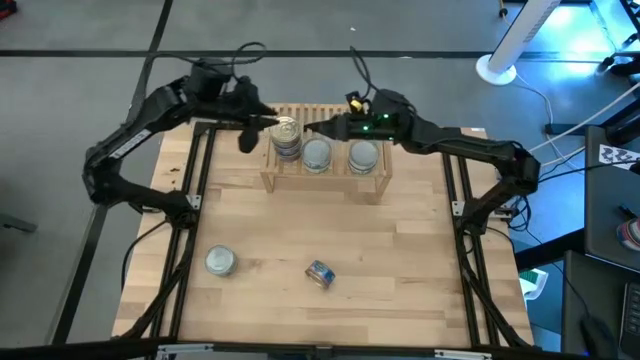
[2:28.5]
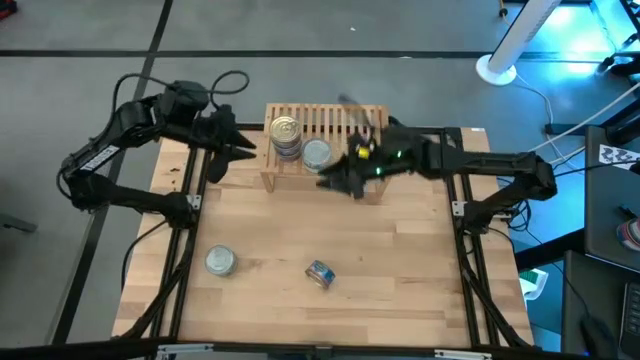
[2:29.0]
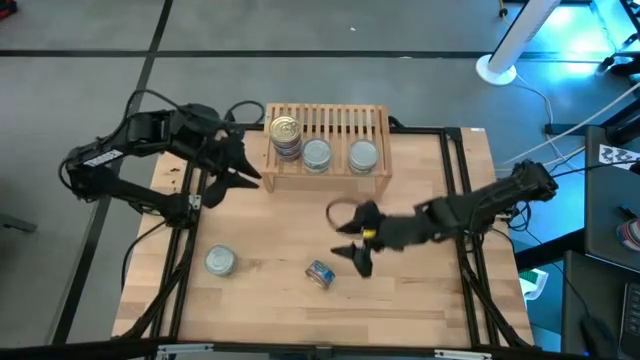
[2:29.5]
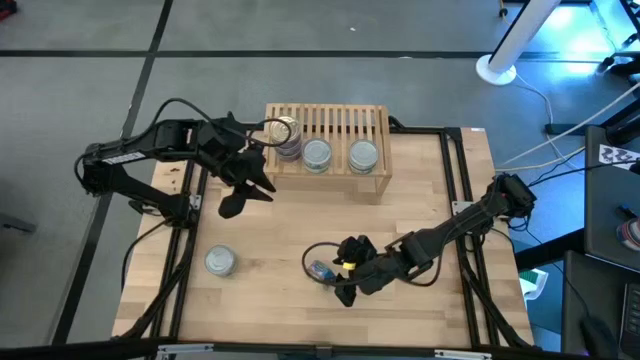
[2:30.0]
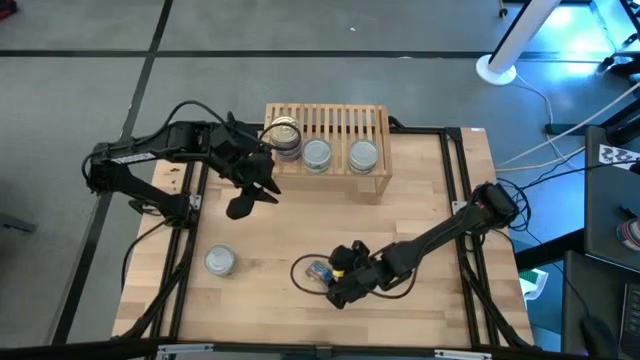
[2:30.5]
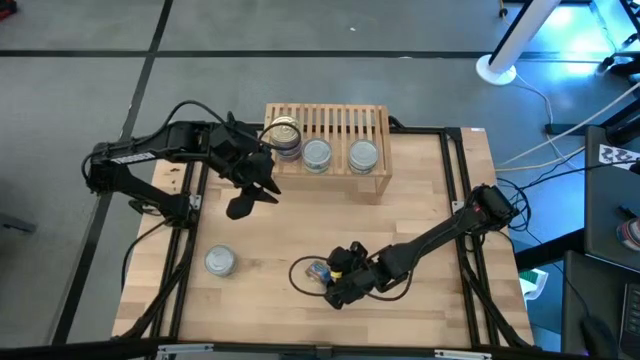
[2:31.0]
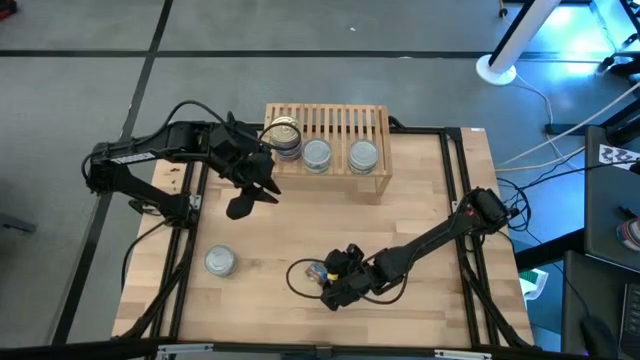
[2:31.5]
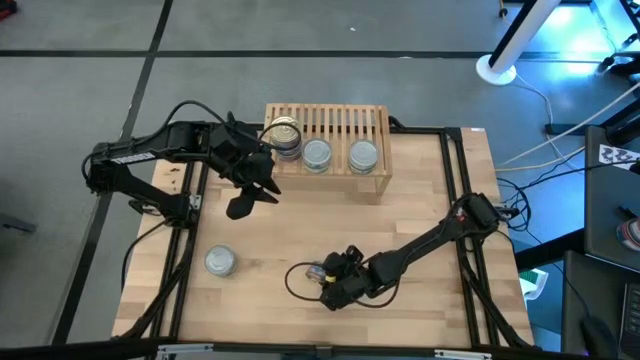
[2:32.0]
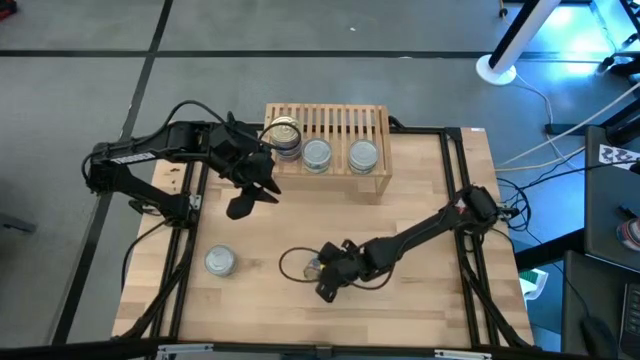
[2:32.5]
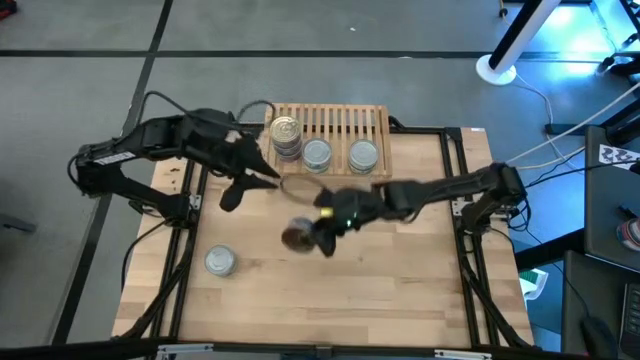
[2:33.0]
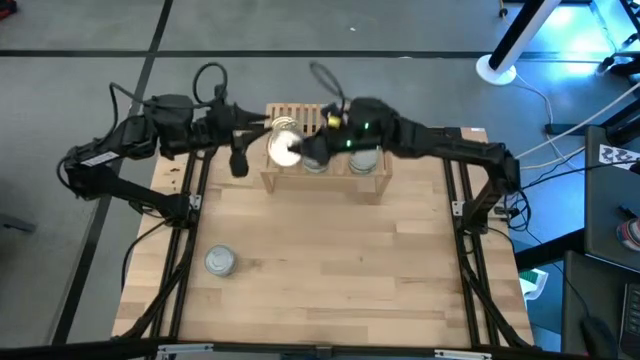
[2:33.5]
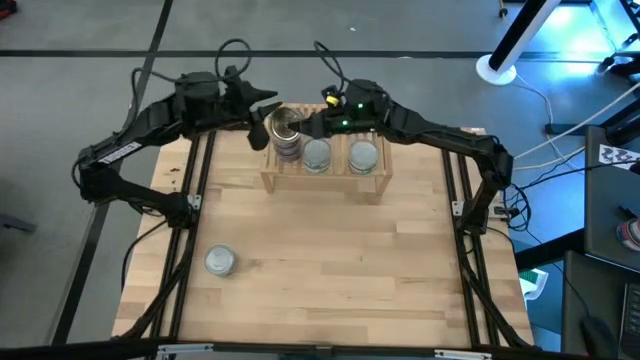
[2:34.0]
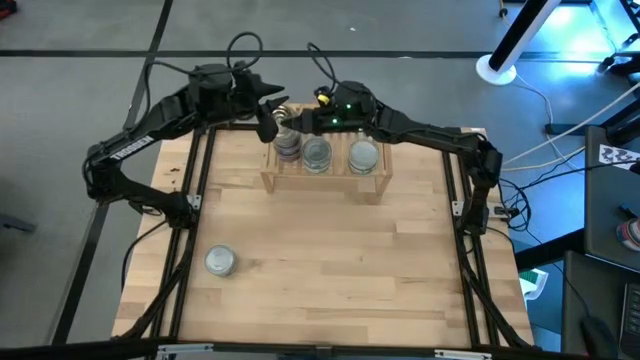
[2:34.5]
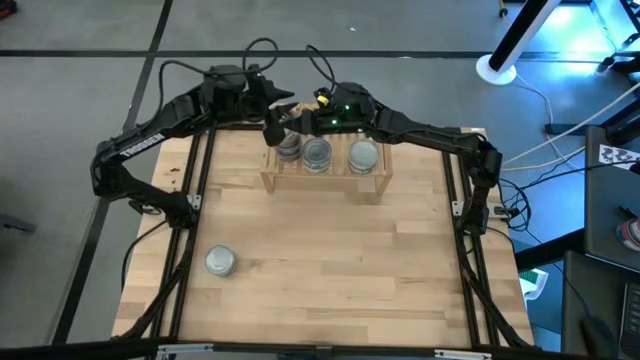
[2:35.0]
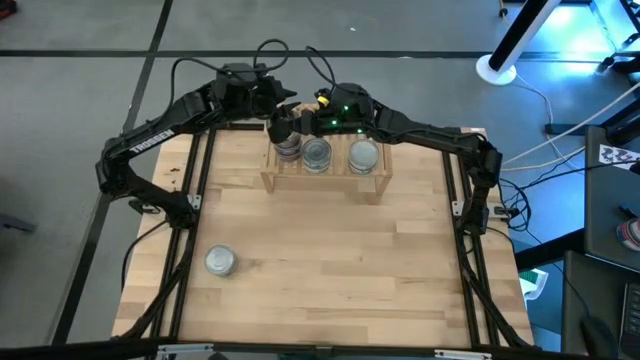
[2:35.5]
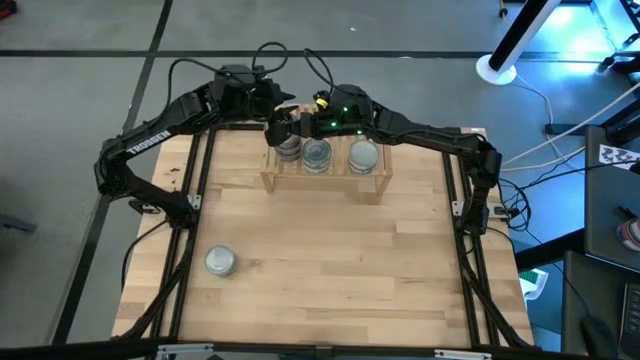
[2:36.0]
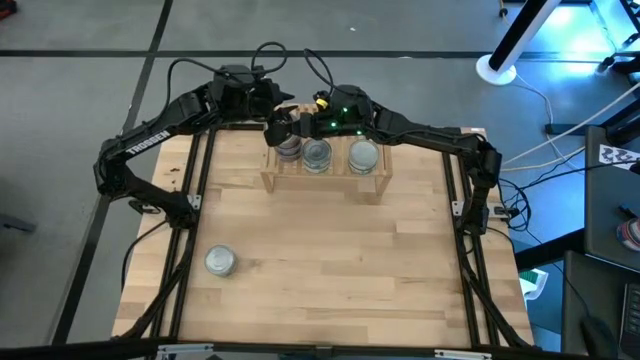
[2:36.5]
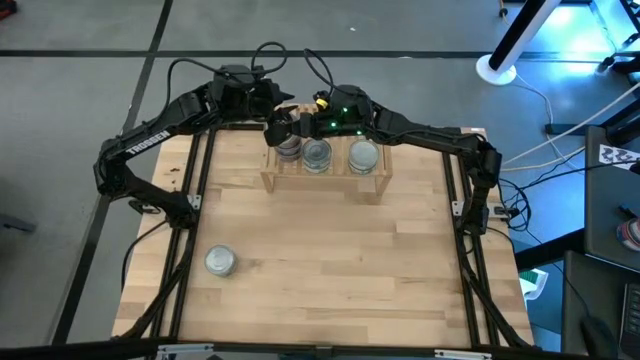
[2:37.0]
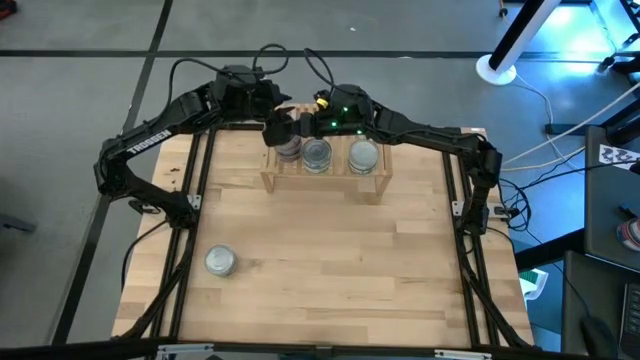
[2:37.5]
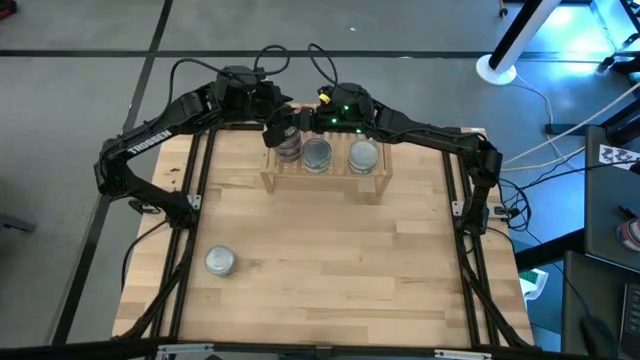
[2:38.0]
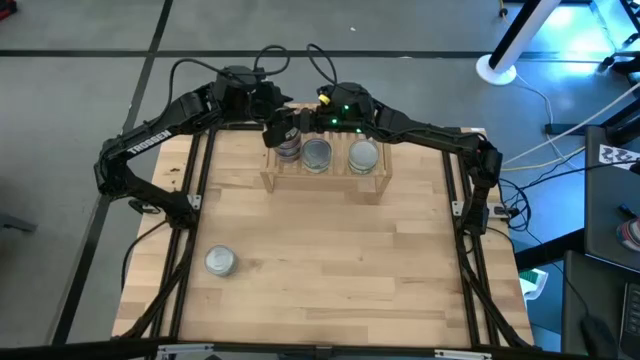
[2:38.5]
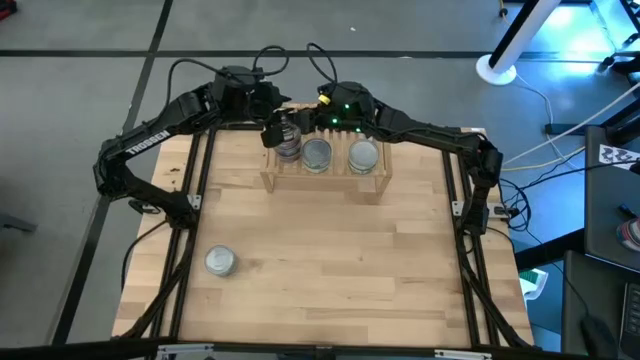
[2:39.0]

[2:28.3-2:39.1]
Task: Stack canned seafood by type on shelf
Stack the blue-pink tuna can on top of the other blue-pink tuna can on the shelf

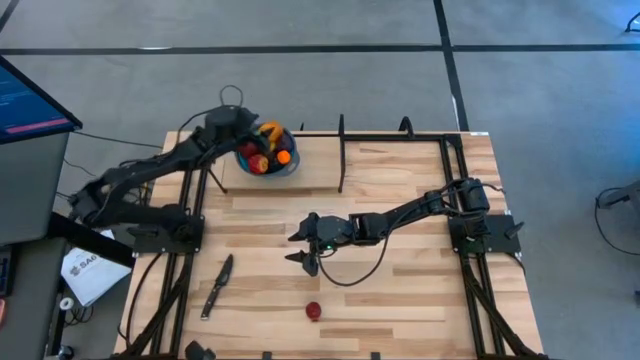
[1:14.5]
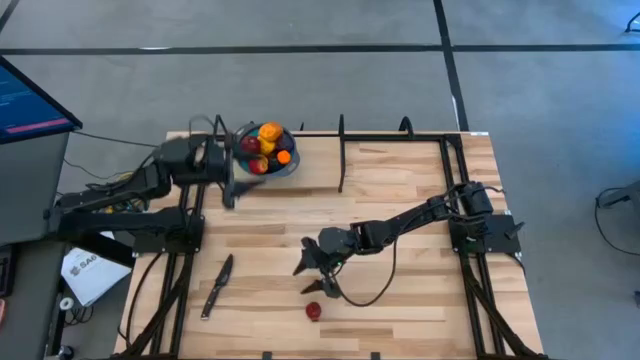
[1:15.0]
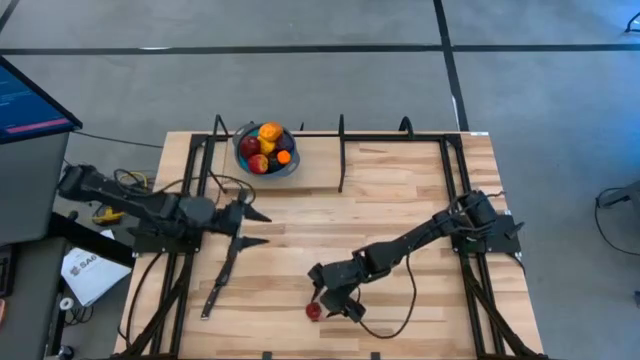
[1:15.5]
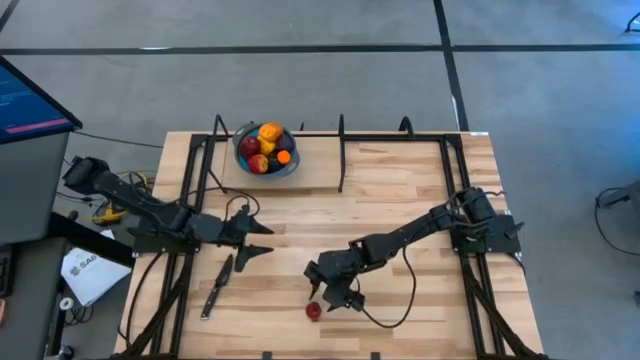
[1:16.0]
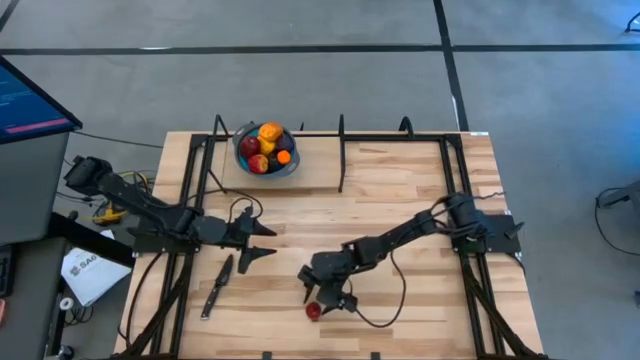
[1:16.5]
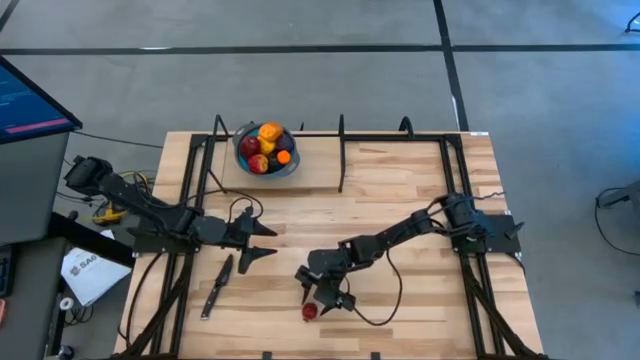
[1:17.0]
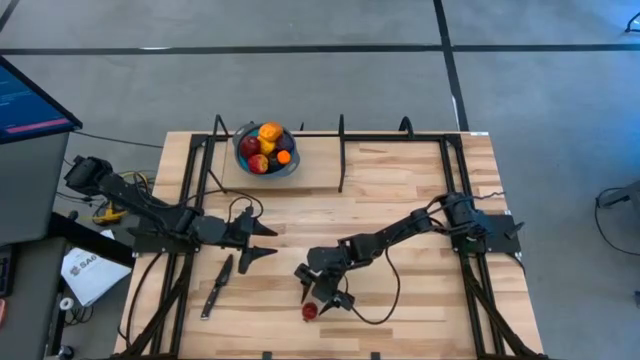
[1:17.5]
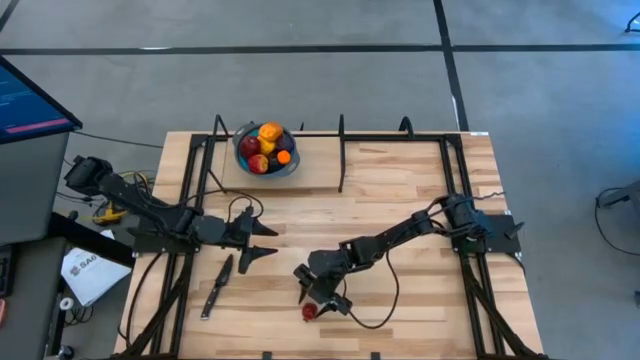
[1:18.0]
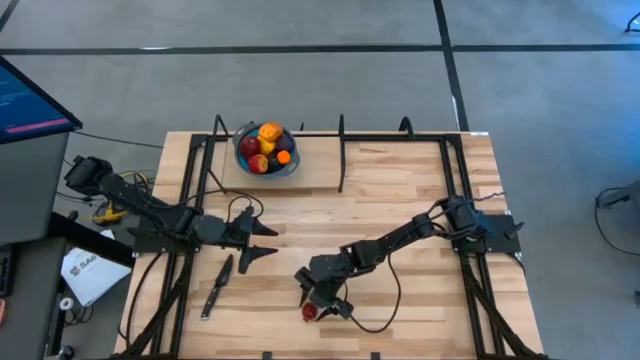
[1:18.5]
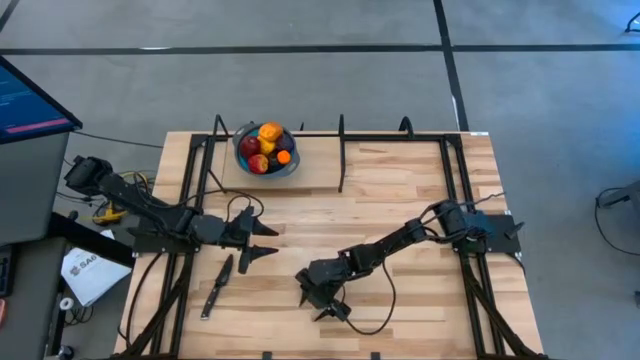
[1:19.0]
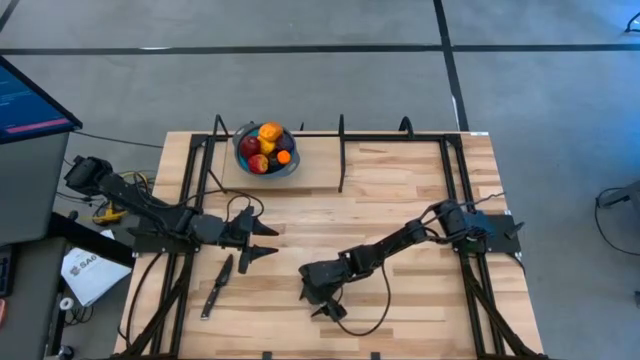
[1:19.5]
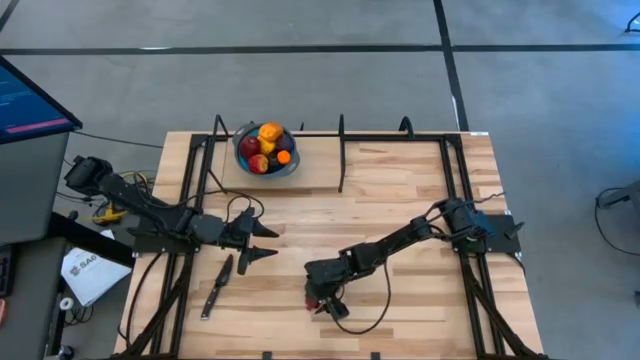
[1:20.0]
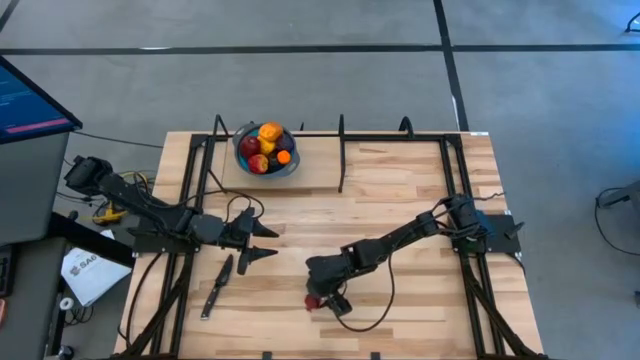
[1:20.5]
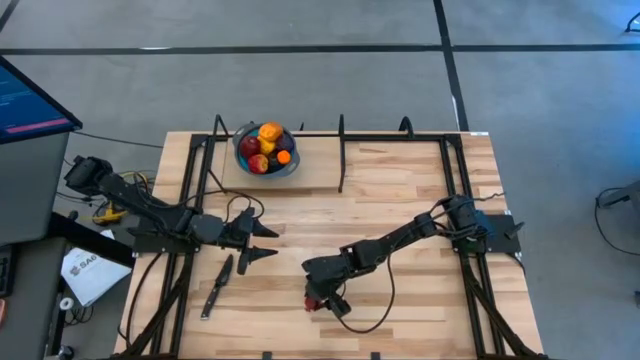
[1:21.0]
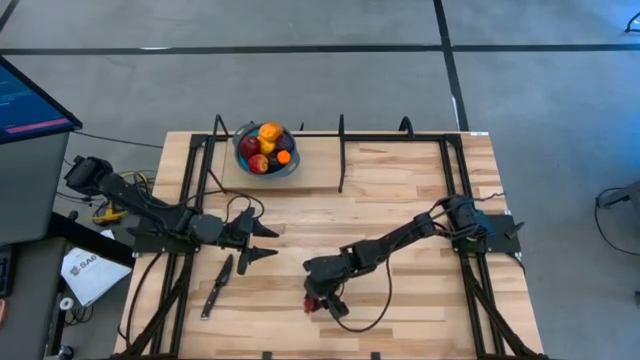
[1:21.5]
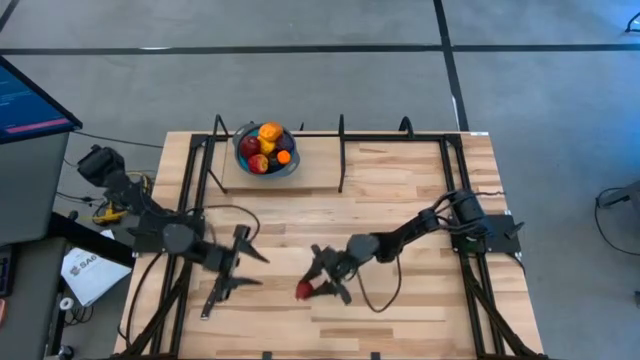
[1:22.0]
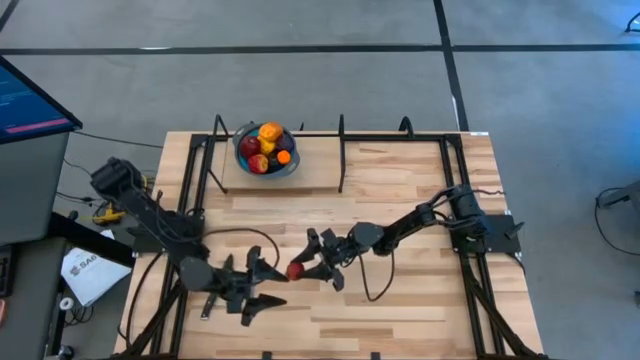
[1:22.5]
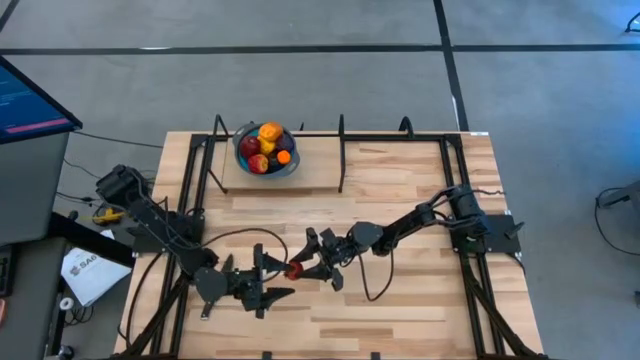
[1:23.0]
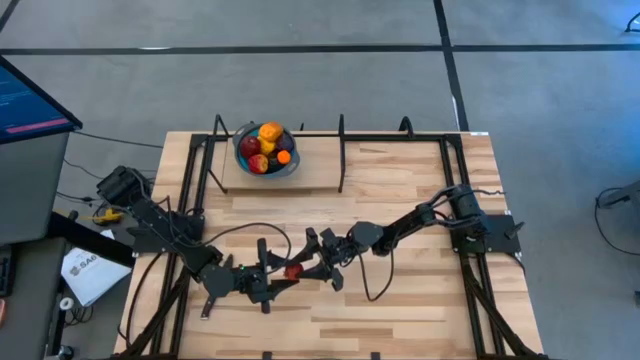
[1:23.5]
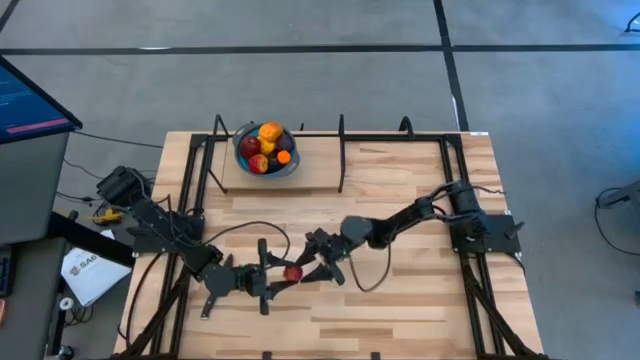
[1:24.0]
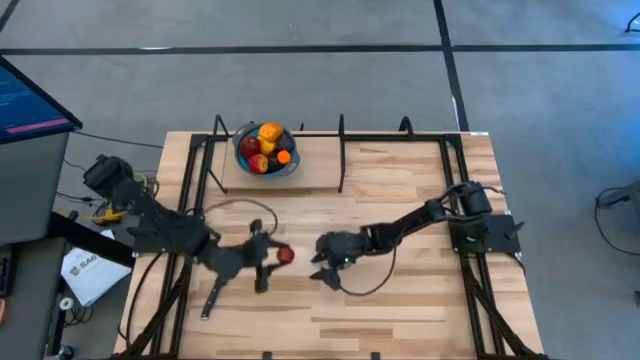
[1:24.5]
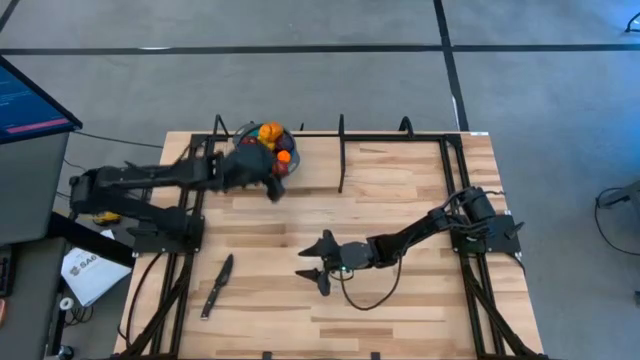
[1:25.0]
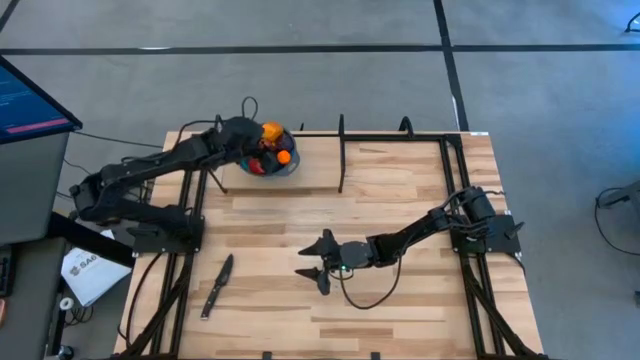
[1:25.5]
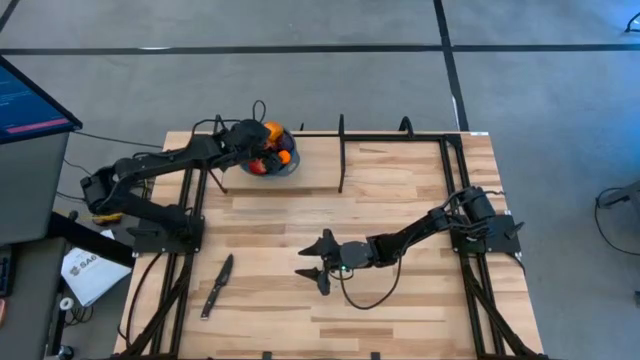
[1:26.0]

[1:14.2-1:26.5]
Task: Pick & Place Fruit
Put the pomegranate in the blue strainer bowl on the shelf
